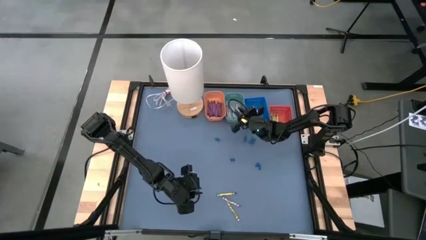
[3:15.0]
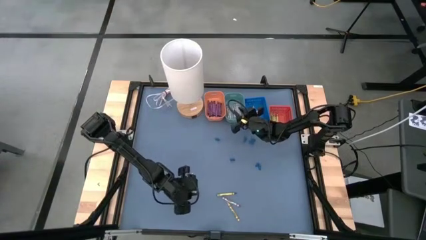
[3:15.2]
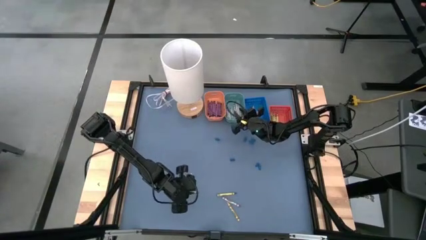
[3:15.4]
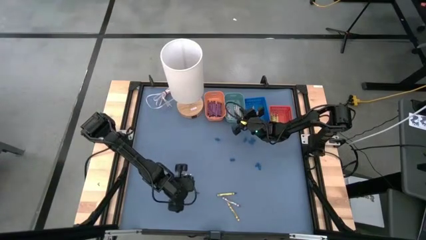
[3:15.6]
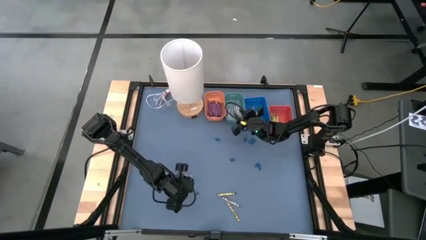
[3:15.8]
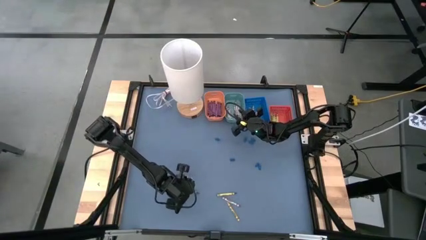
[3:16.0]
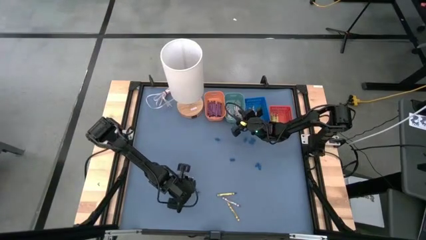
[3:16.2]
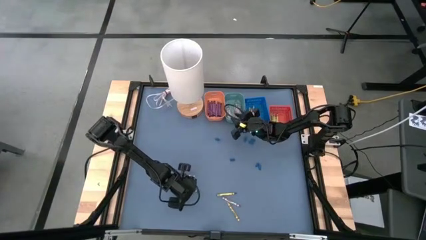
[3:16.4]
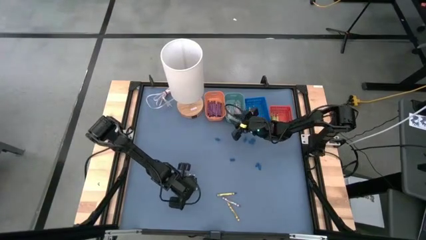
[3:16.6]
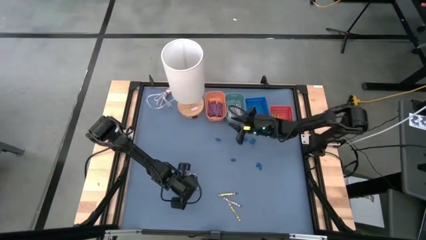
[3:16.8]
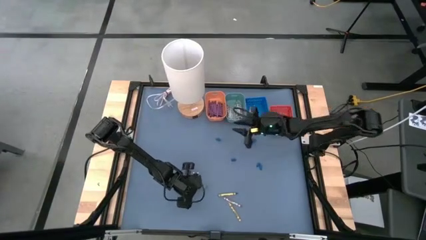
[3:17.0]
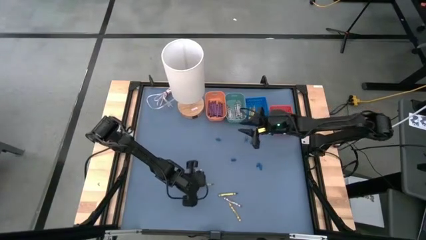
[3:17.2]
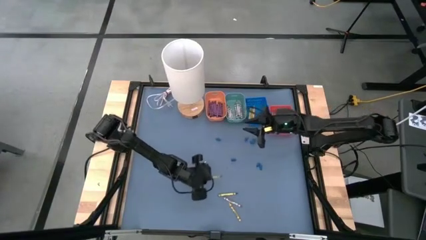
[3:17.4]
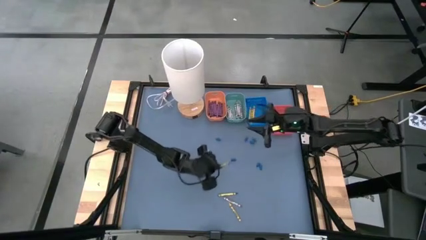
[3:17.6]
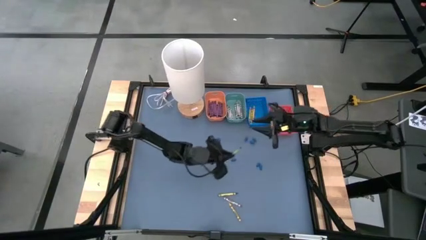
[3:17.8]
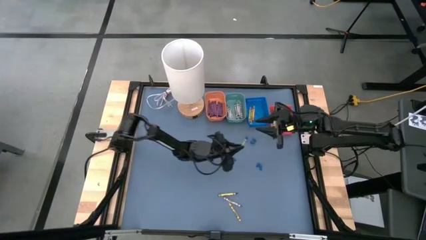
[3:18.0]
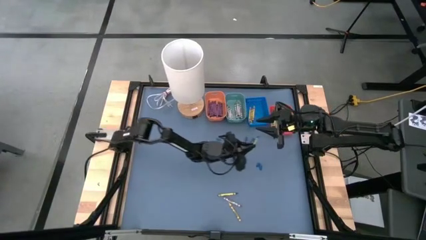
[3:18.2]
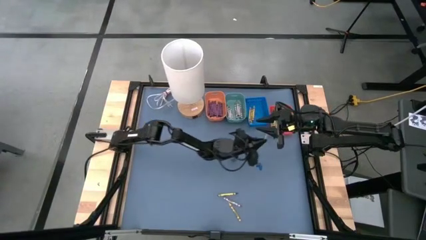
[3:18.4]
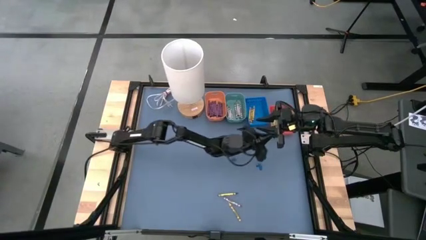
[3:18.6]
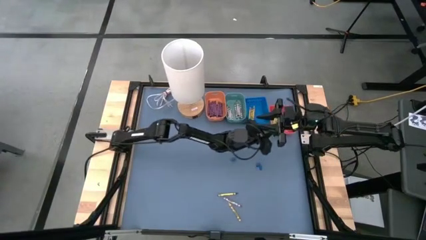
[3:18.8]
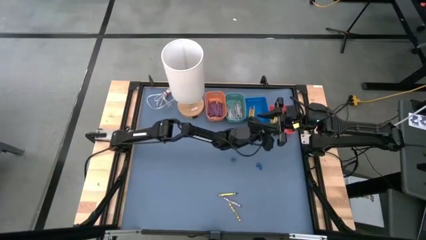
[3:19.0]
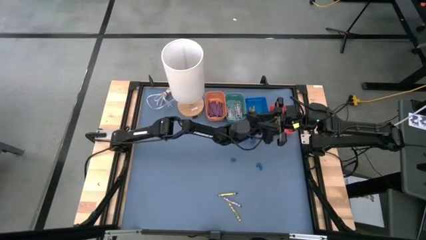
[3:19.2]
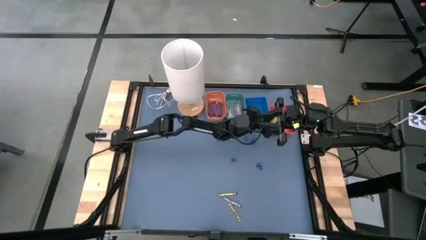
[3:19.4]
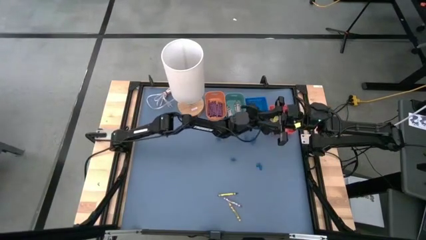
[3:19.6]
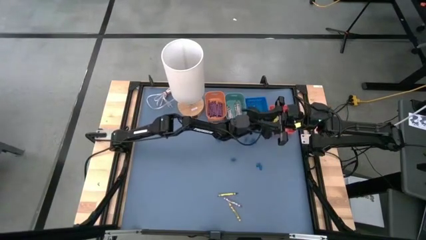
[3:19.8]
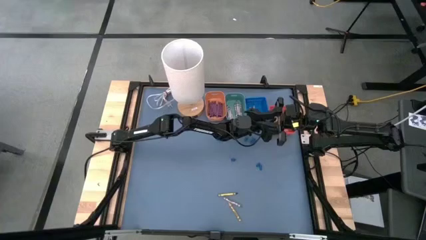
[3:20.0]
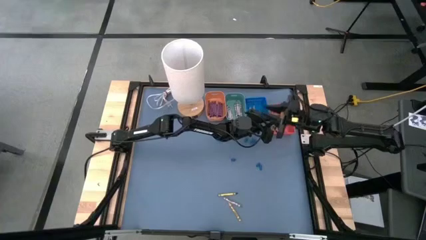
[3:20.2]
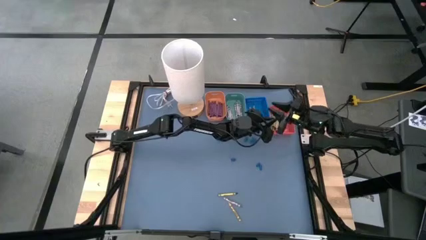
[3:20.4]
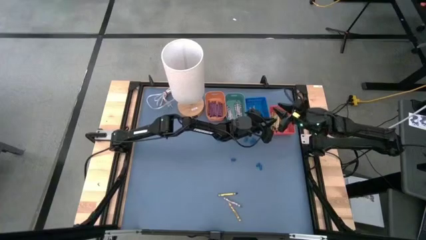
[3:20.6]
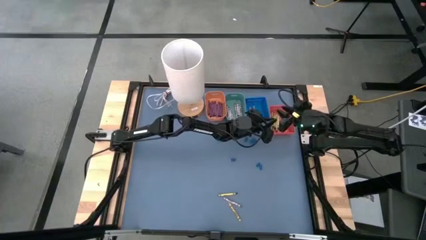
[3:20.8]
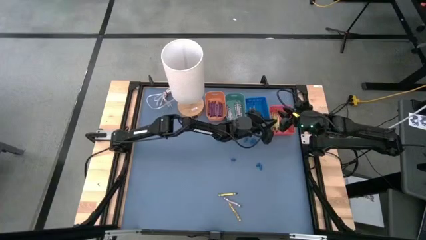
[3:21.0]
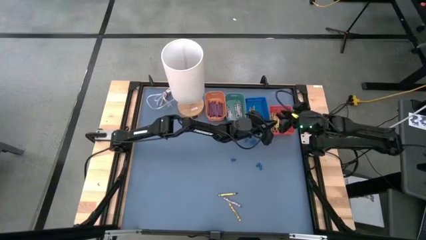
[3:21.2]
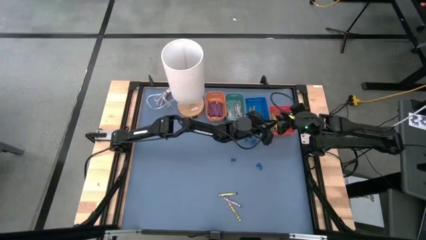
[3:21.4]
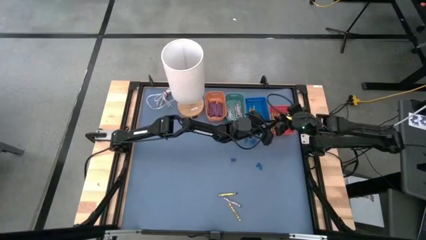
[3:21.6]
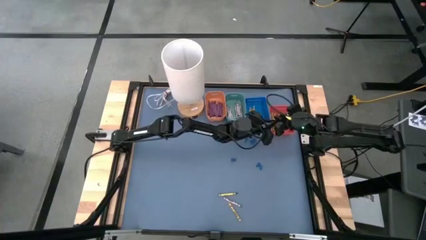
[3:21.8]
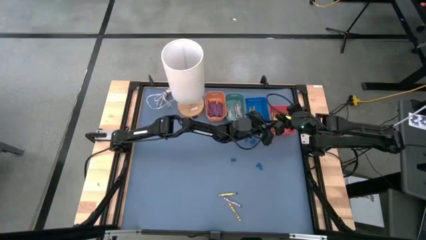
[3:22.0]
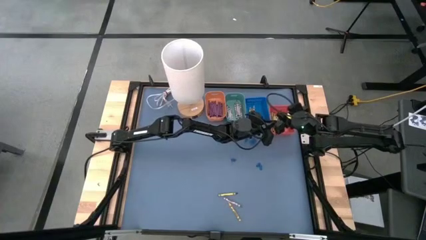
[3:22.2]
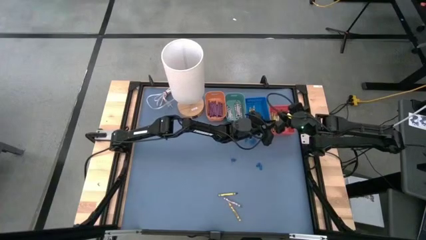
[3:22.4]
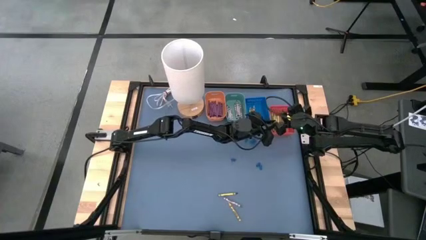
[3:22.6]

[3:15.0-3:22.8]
Task: Sort crayons
Put the green crayon into the orange bin

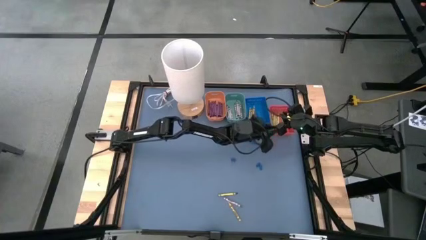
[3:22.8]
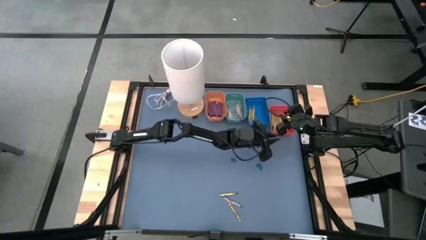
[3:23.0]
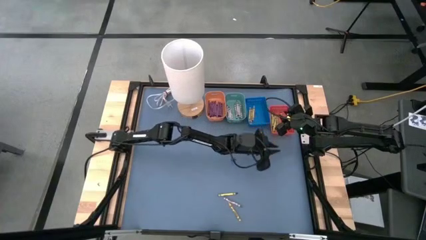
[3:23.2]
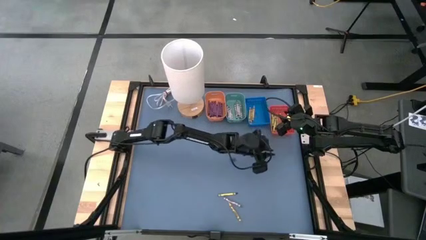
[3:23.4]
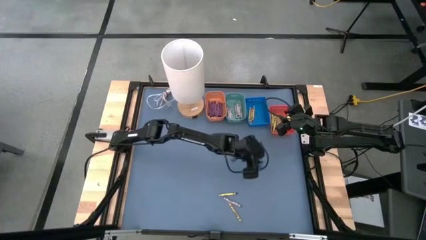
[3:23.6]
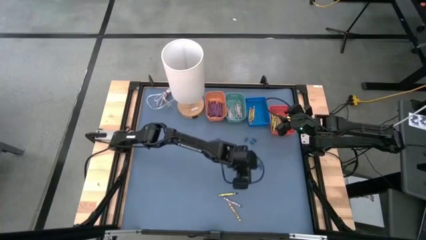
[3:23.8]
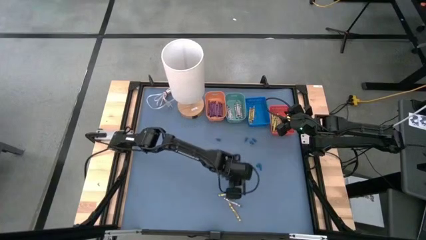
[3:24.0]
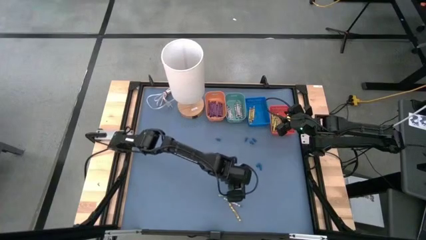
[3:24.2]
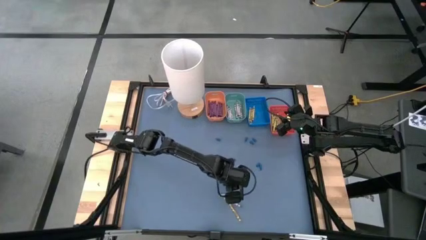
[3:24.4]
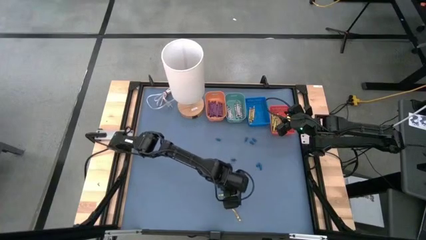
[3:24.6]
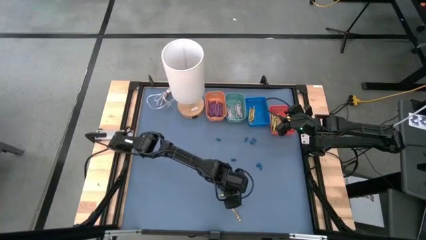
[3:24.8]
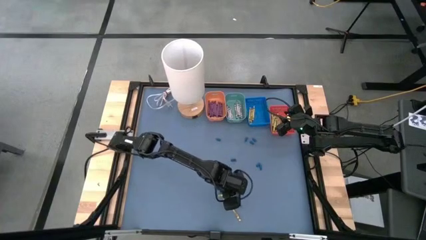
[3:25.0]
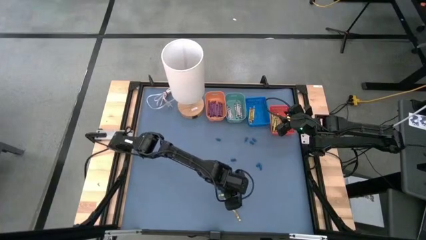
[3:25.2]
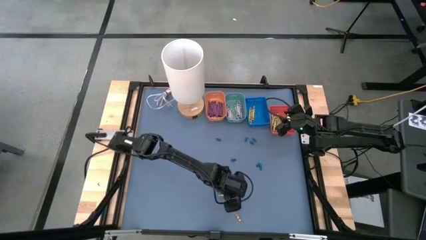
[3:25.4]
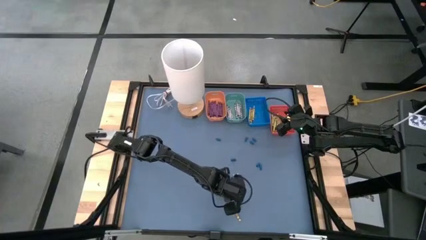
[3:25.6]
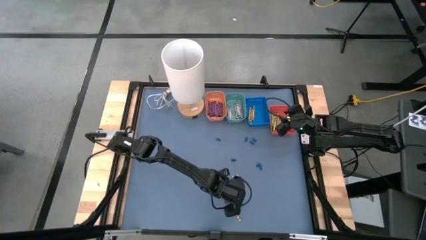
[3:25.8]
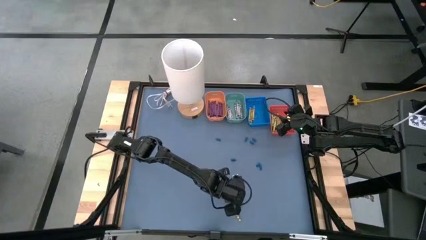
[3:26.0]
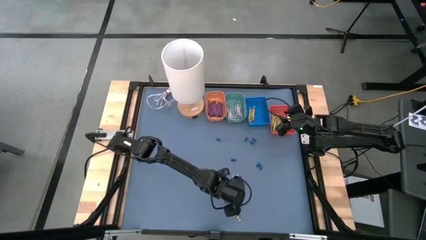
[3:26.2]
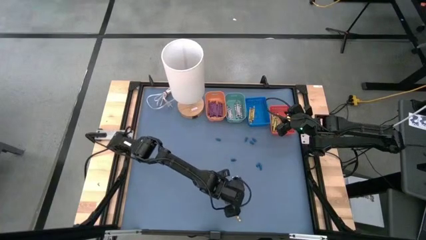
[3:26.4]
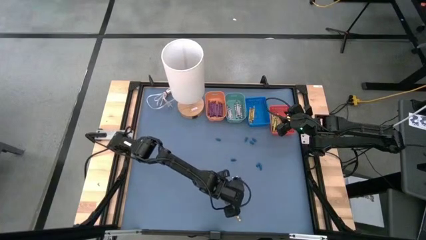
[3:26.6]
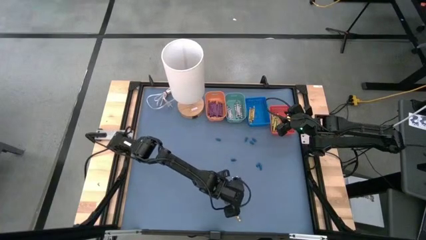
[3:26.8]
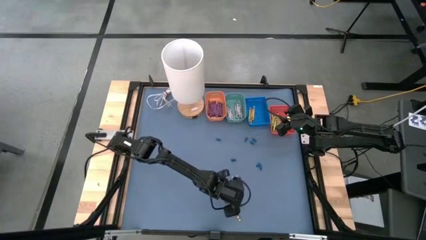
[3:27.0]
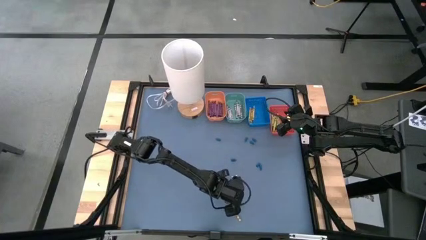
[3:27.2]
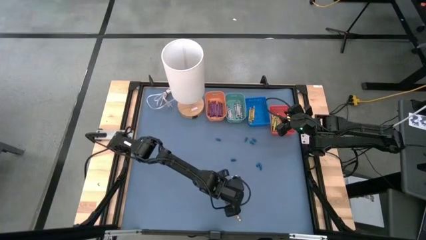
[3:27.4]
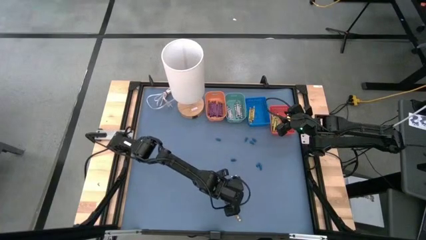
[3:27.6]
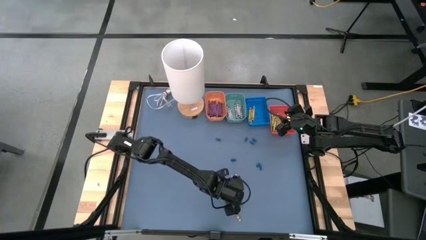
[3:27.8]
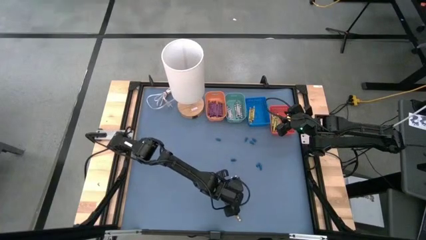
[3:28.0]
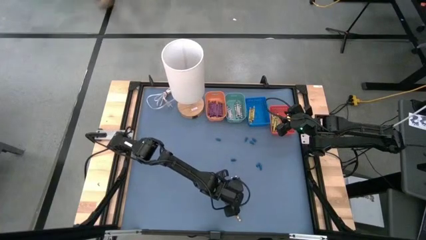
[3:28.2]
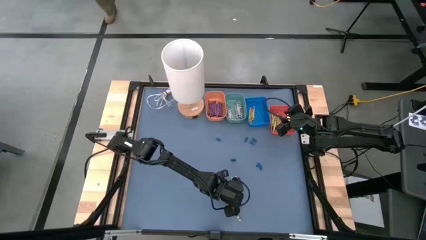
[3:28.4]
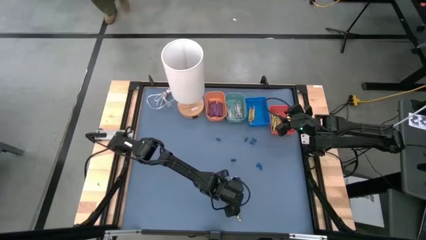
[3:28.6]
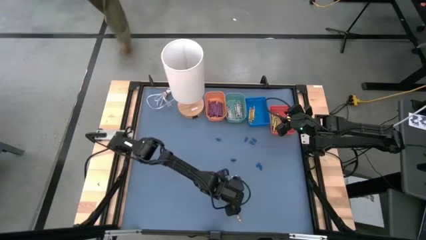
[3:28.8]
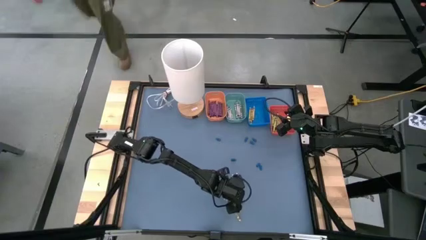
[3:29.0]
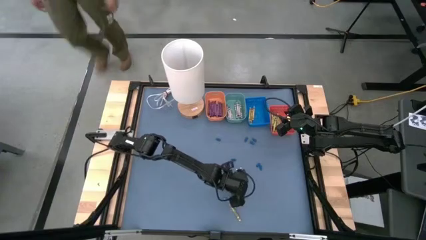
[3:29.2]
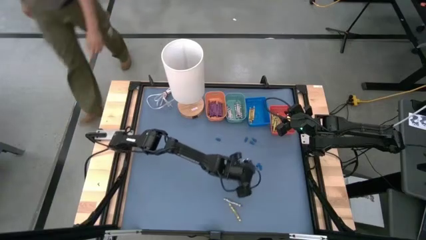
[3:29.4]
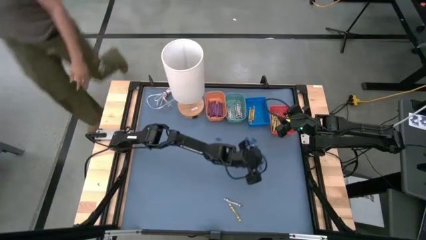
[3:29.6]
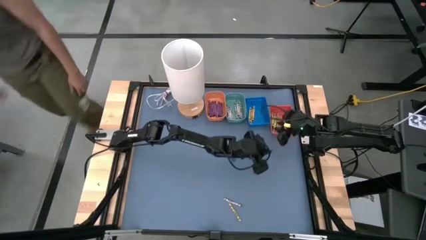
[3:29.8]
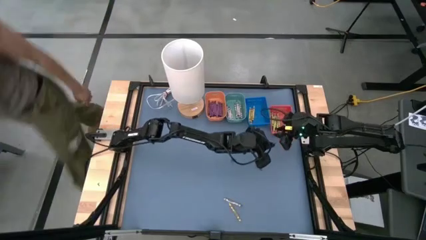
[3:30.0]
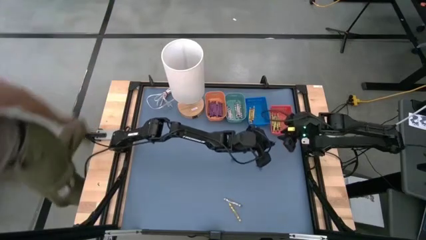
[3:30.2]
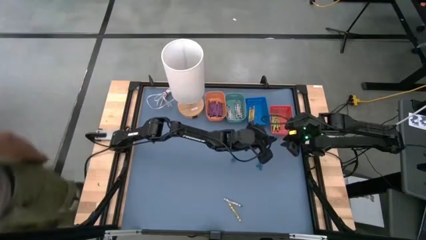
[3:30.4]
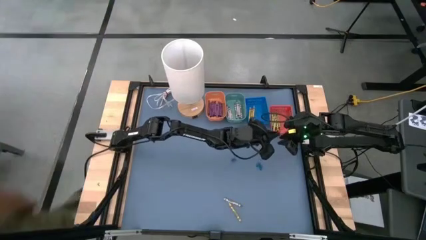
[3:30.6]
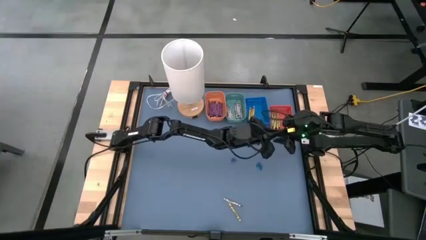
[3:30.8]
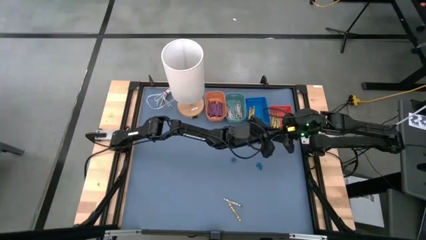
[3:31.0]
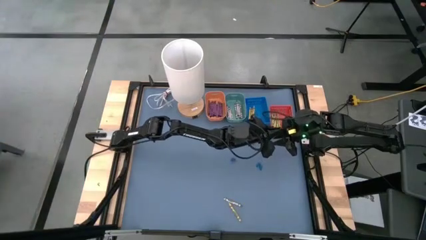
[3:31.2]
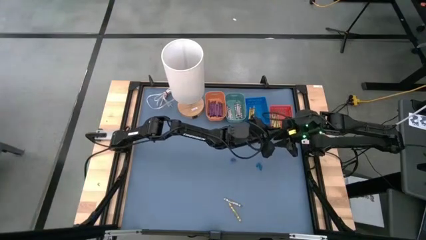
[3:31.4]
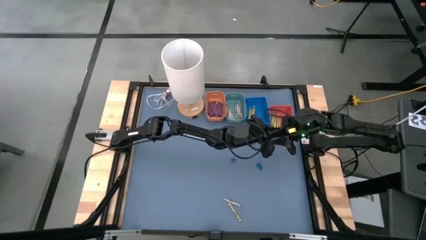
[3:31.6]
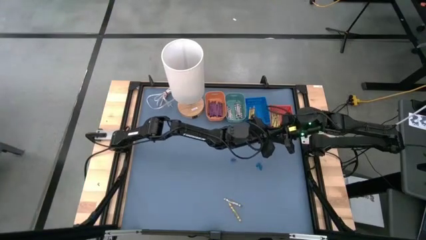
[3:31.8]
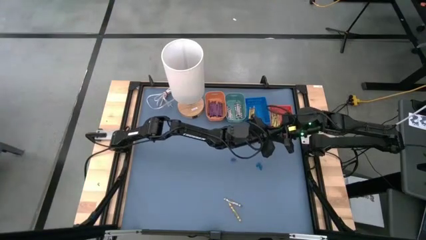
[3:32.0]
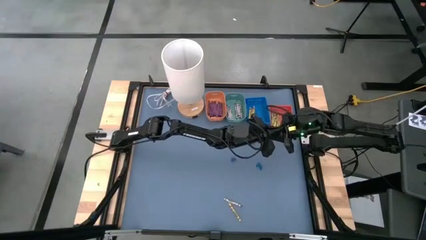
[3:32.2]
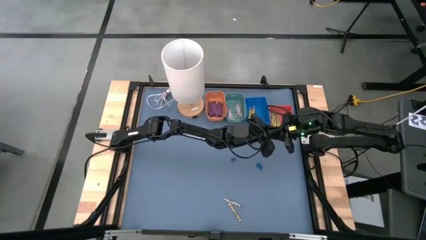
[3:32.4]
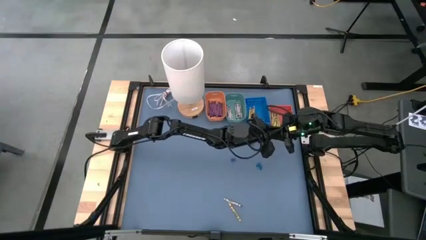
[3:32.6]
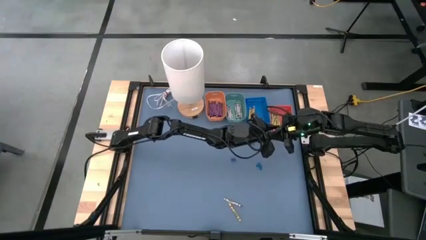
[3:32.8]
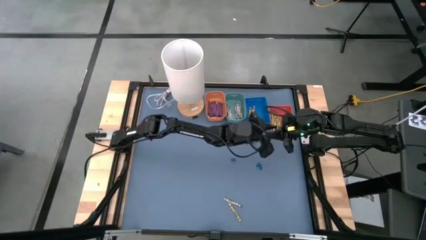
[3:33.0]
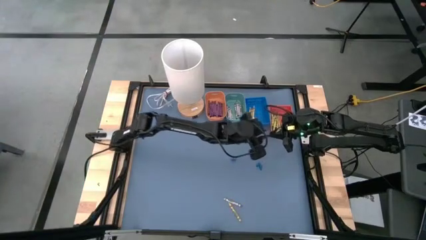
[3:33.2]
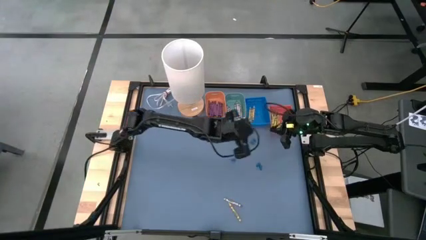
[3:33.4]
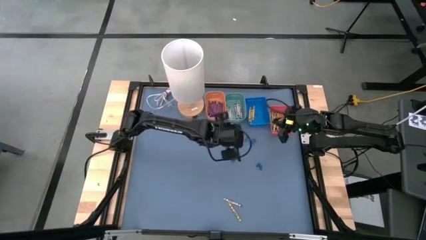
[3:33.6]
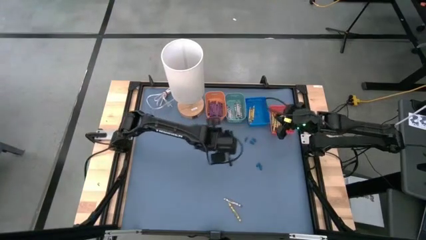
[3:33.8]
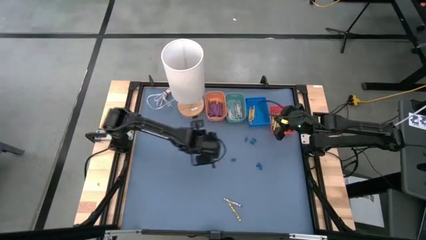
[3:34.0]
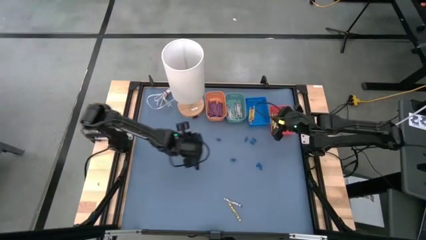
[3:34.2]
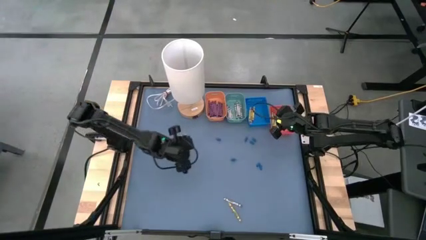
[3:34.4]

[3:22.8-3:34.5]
Put the green crayon into the orange bin
